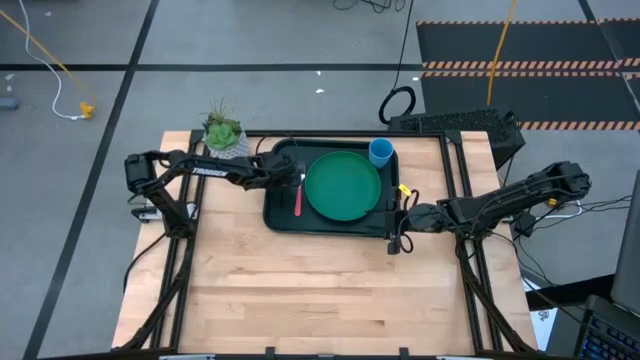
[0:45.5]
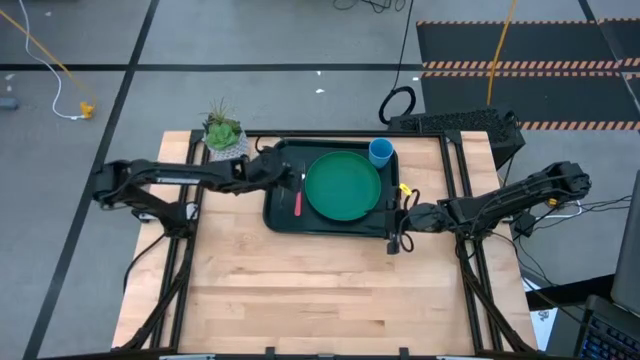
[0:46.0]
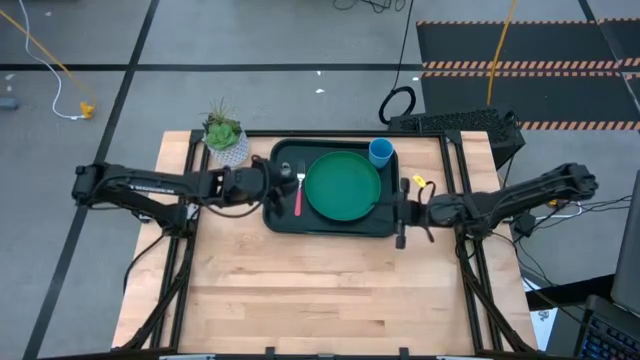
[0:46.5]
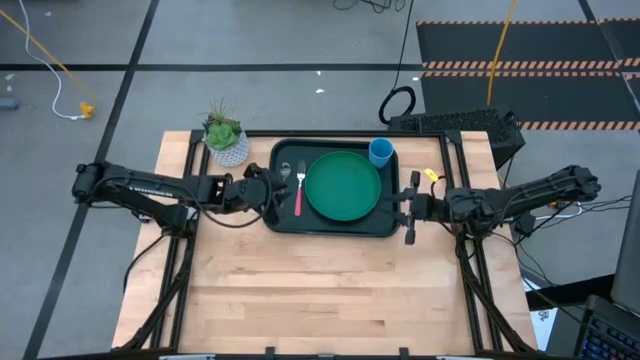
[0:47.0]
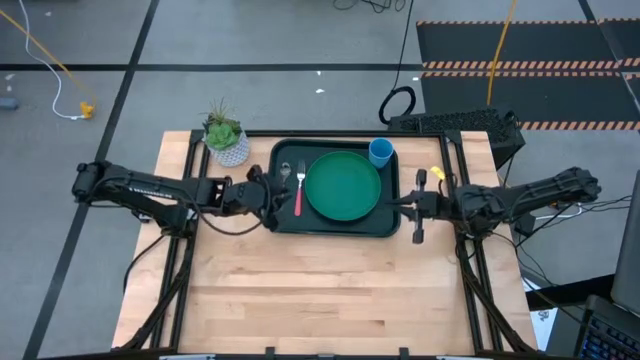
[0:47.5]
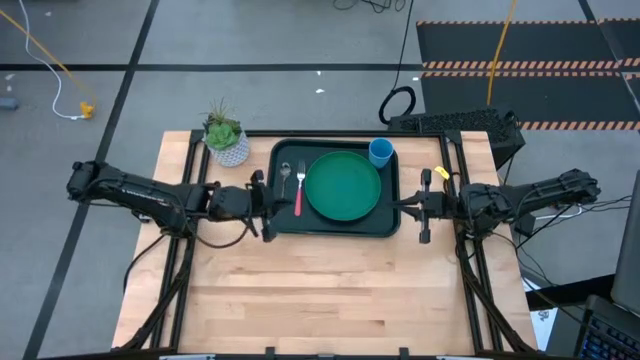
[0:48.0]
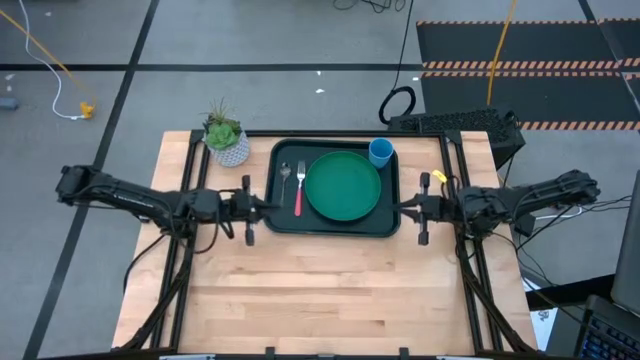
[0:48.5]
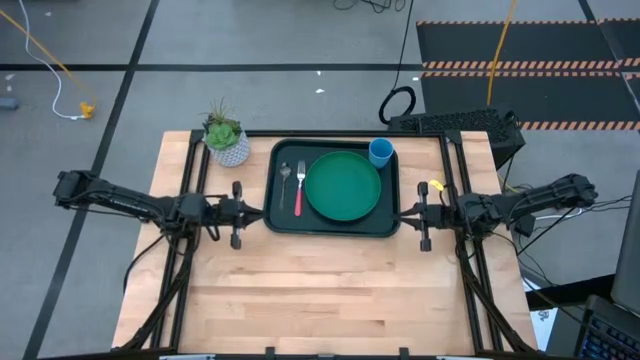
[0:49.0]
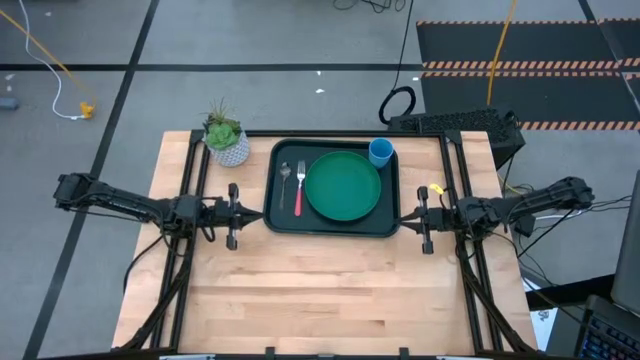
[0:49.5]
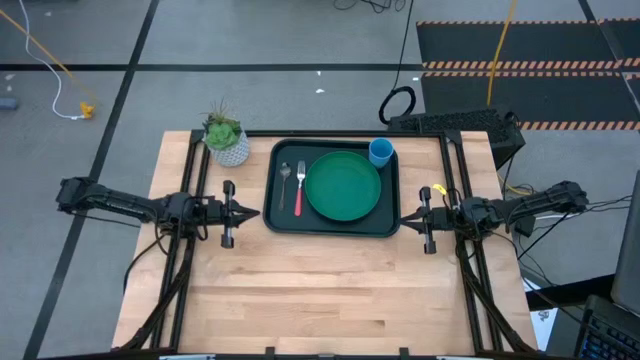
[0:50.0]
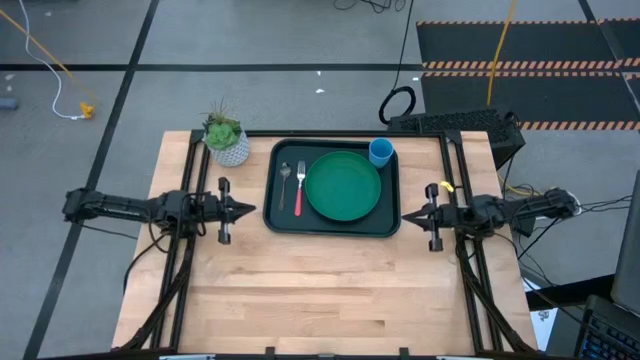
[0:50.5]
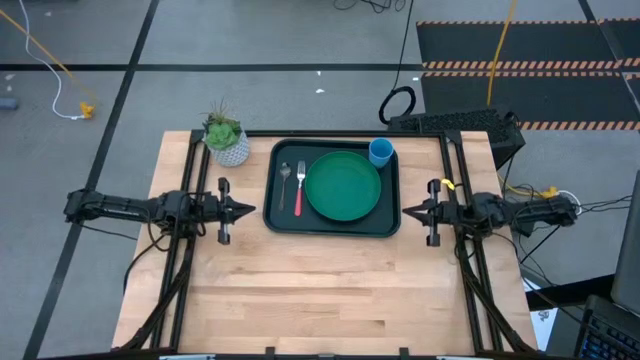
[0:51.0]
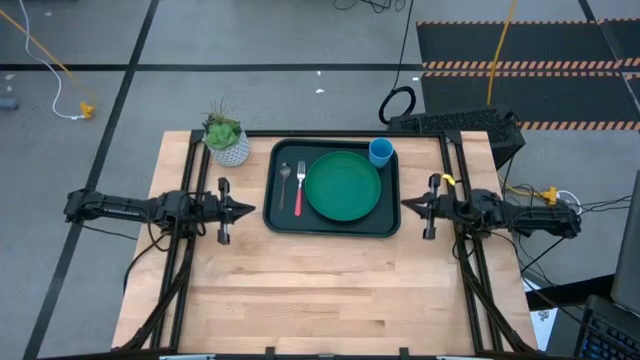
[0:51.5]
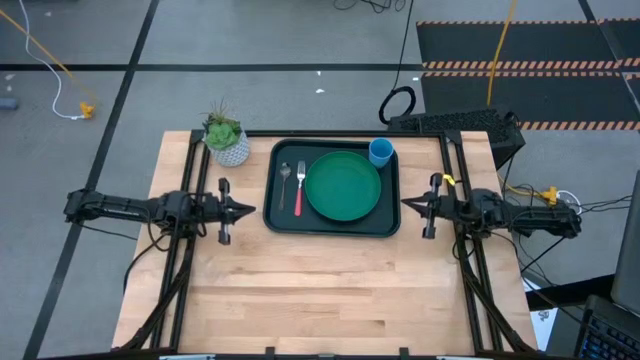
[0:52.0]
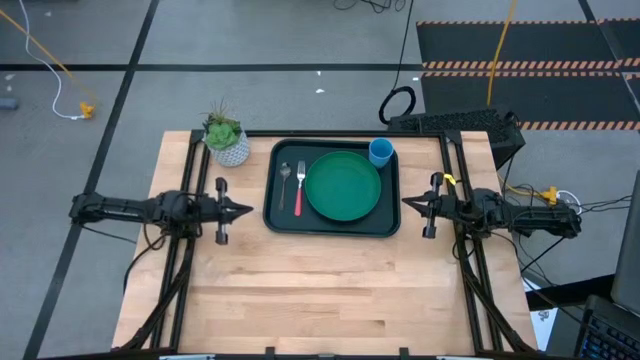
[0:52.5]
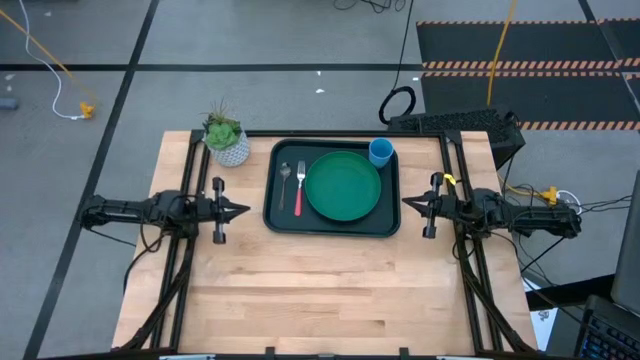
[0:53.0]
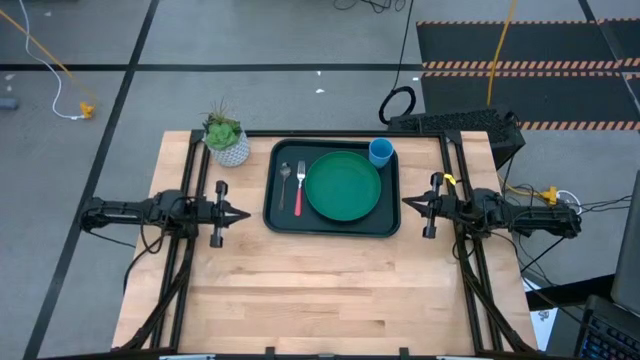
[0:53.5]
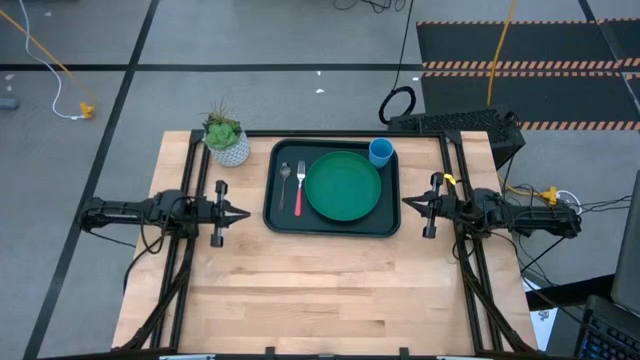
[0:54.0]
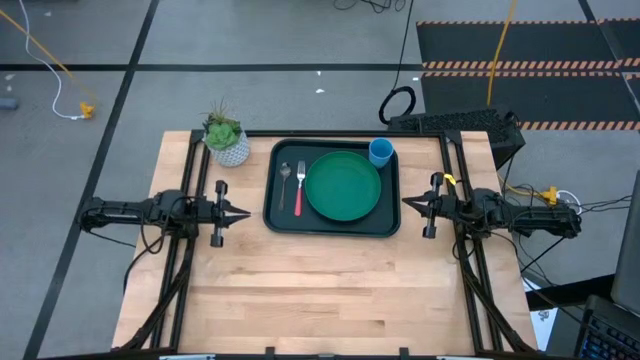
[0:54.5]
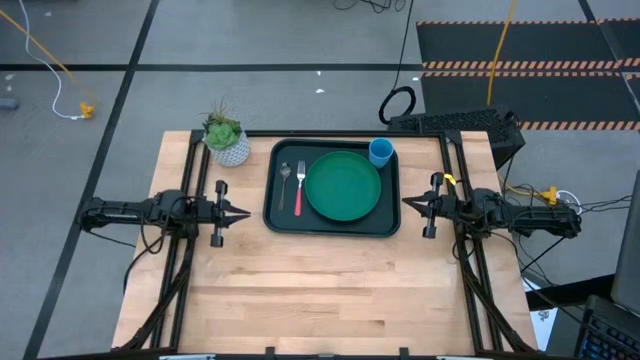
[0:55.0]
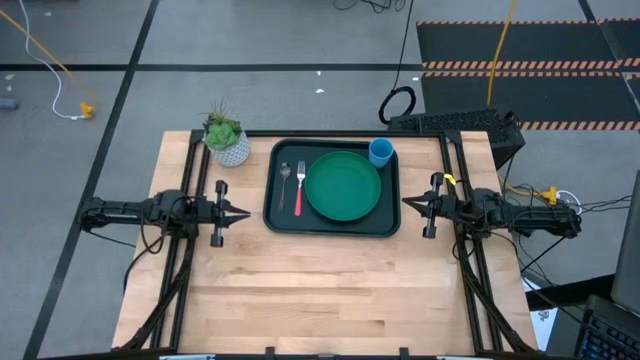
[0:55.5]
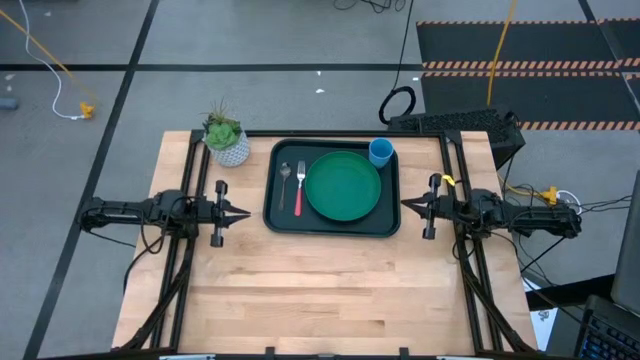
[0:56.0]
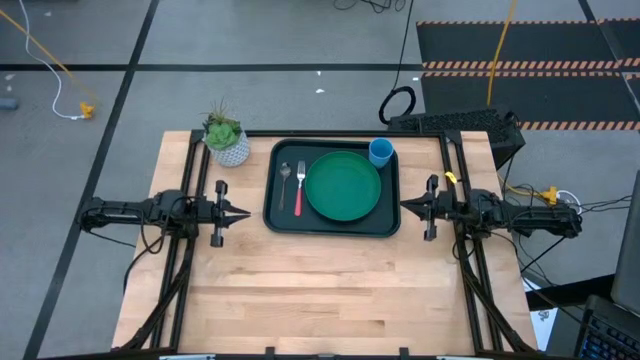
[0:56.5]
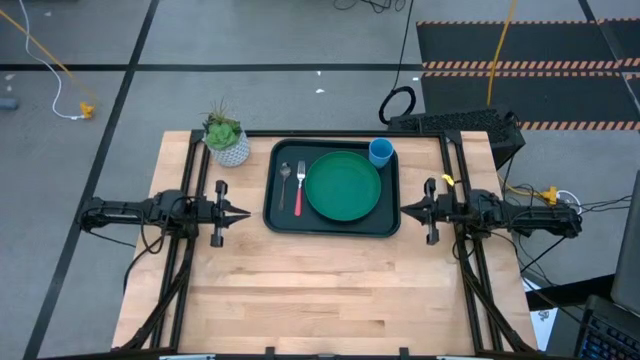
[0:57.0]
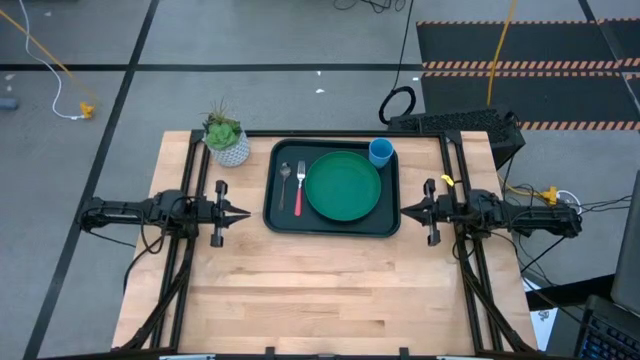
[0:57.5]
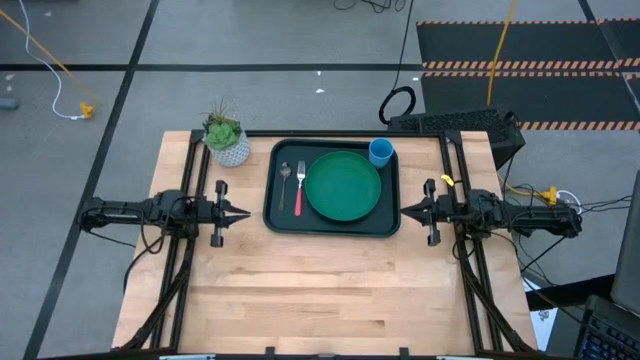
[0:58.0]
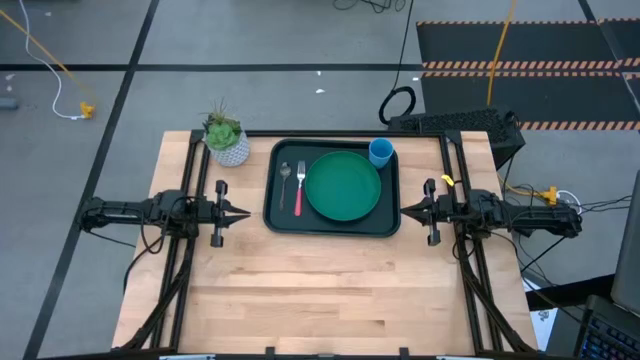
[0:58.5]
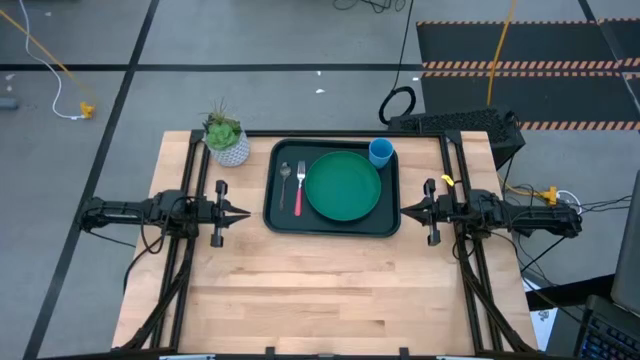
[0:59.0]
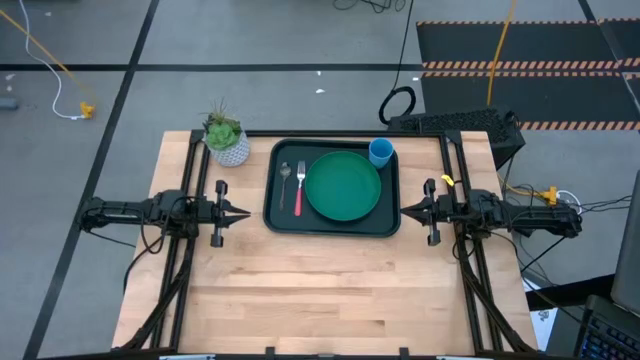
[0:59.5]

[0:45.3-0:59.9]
Task: Pick and place plate/cup/fork/spoon on tray
Return to Home Position
